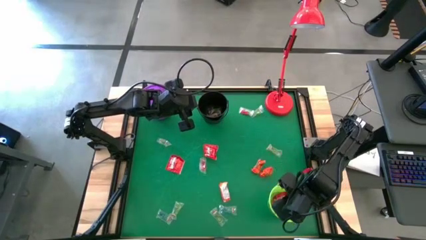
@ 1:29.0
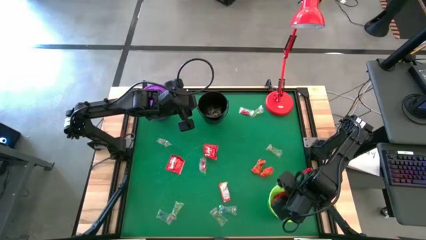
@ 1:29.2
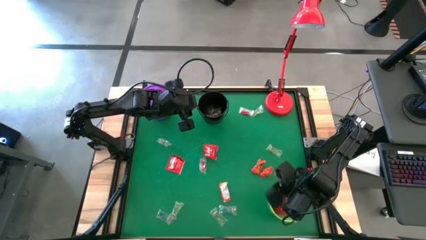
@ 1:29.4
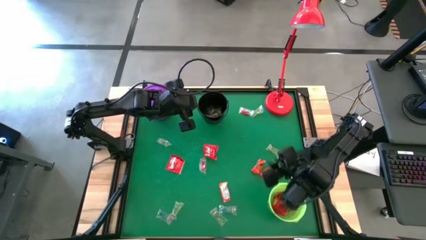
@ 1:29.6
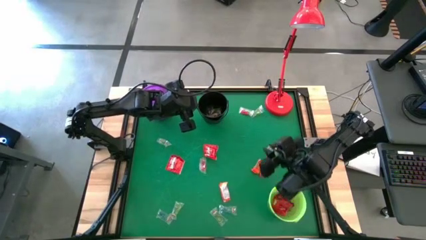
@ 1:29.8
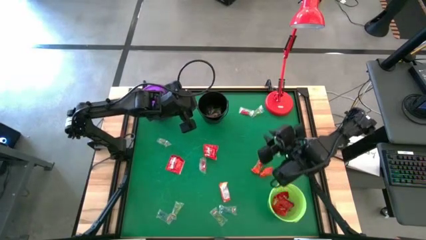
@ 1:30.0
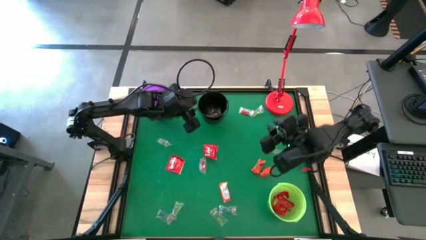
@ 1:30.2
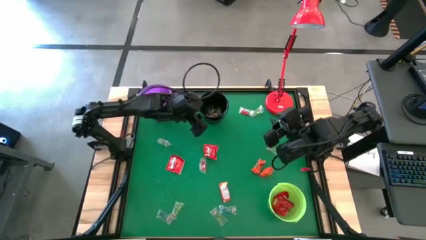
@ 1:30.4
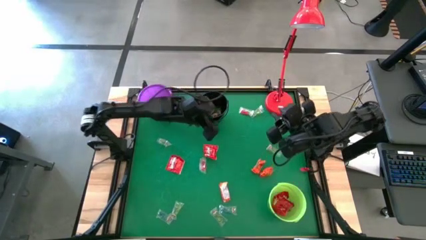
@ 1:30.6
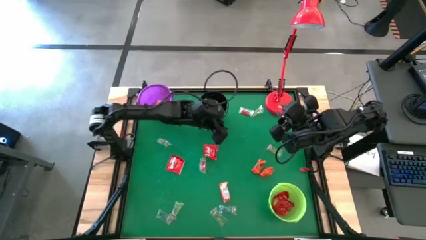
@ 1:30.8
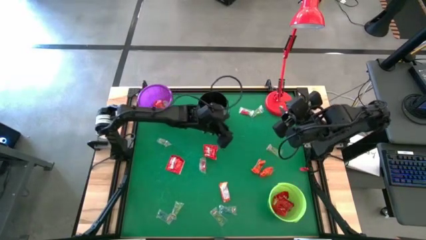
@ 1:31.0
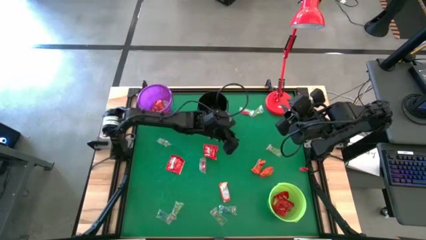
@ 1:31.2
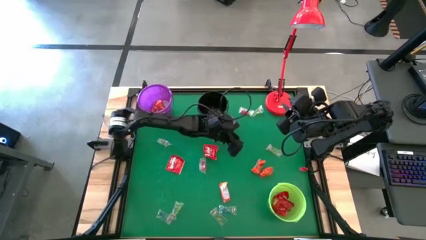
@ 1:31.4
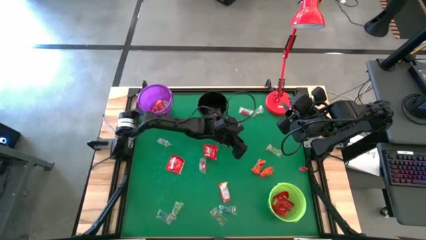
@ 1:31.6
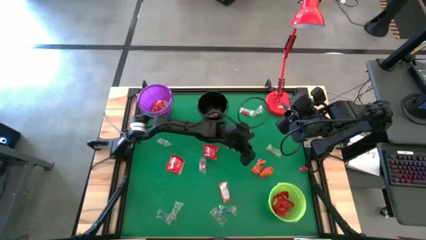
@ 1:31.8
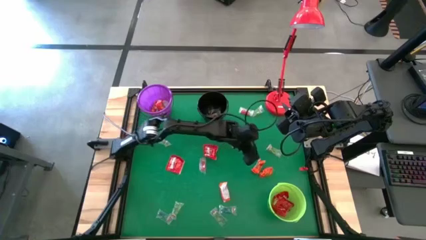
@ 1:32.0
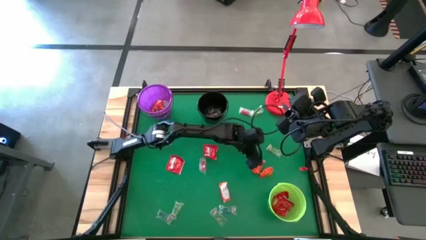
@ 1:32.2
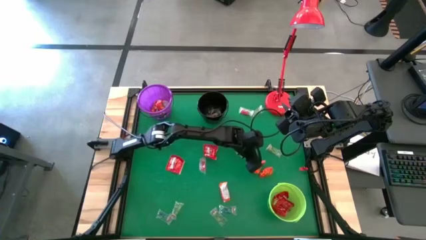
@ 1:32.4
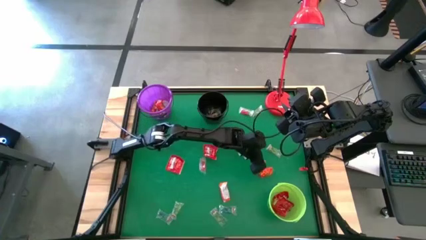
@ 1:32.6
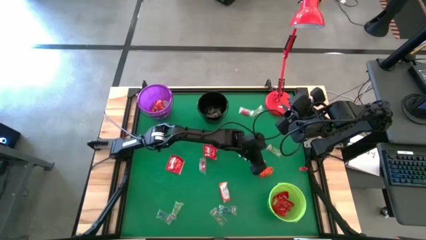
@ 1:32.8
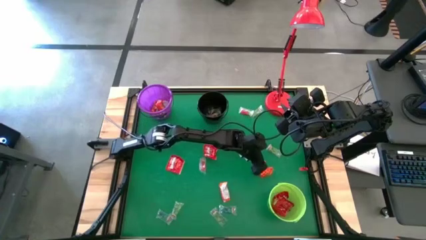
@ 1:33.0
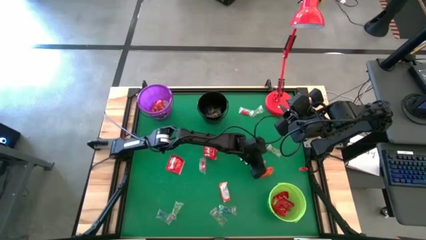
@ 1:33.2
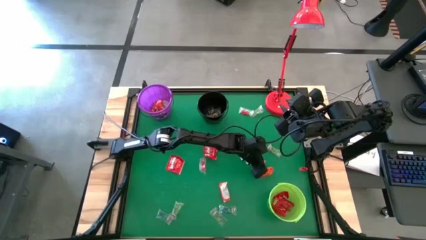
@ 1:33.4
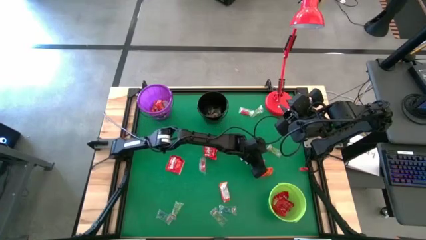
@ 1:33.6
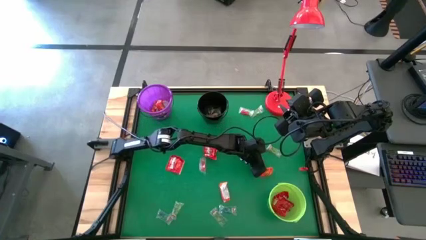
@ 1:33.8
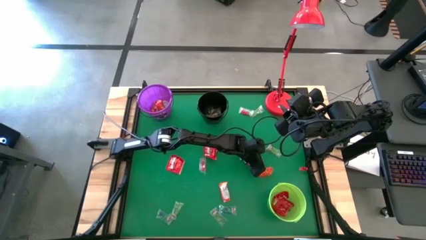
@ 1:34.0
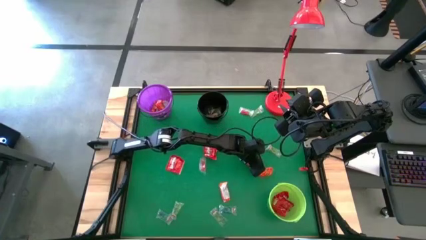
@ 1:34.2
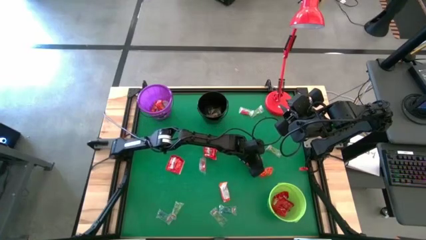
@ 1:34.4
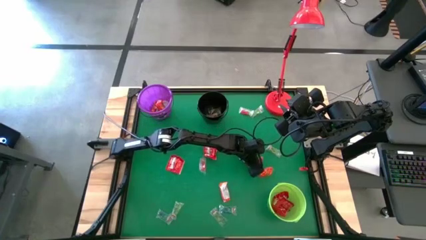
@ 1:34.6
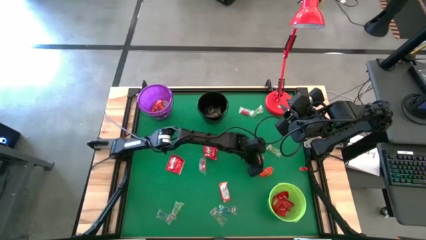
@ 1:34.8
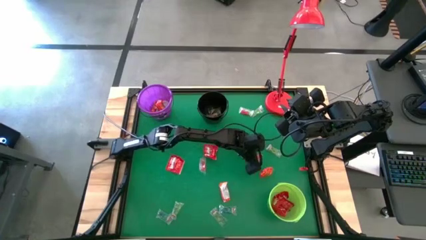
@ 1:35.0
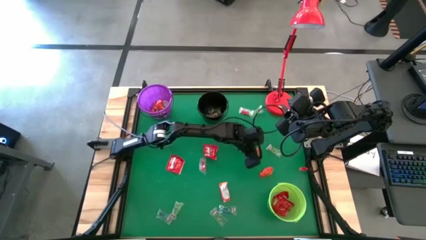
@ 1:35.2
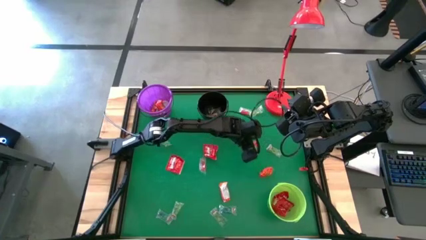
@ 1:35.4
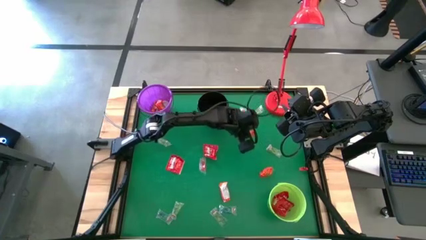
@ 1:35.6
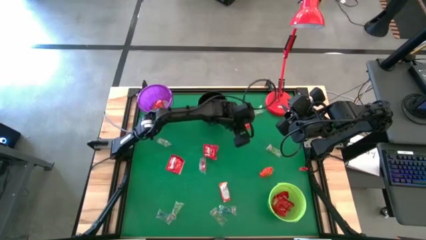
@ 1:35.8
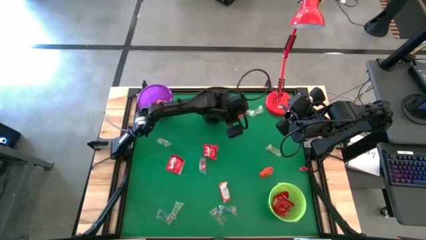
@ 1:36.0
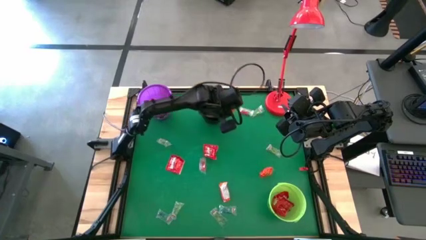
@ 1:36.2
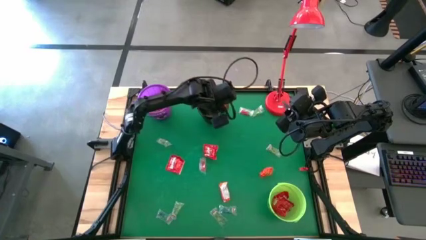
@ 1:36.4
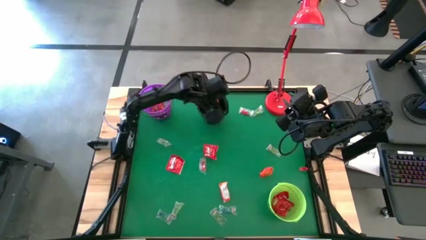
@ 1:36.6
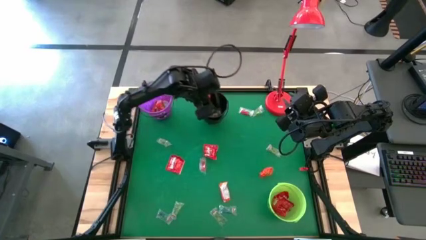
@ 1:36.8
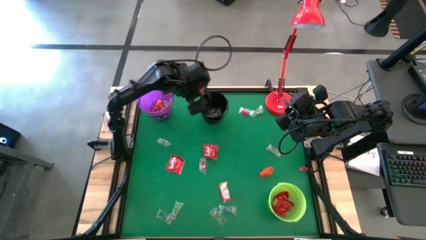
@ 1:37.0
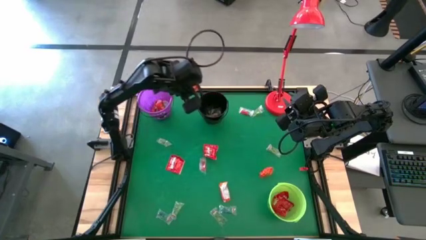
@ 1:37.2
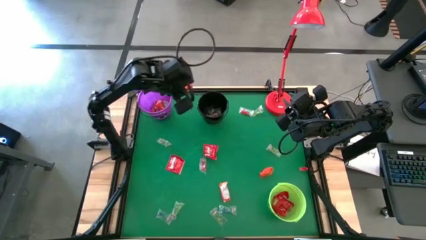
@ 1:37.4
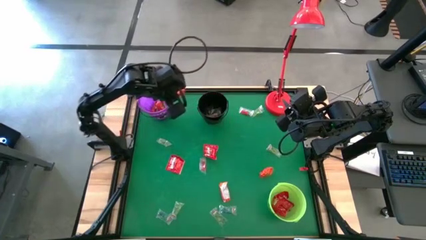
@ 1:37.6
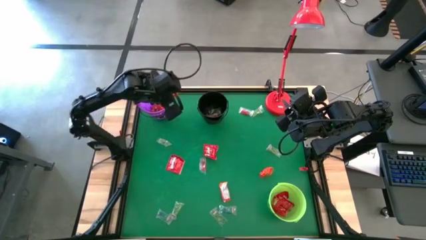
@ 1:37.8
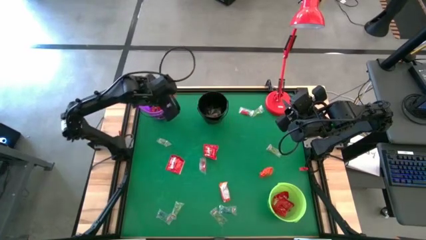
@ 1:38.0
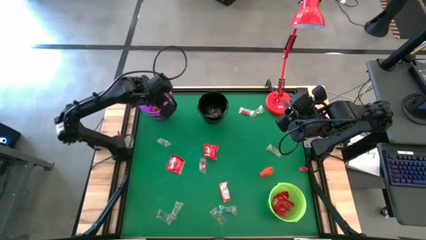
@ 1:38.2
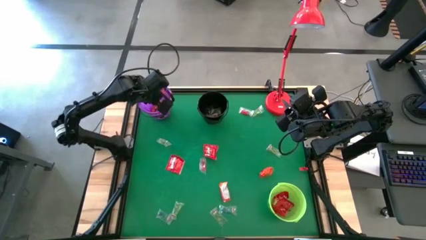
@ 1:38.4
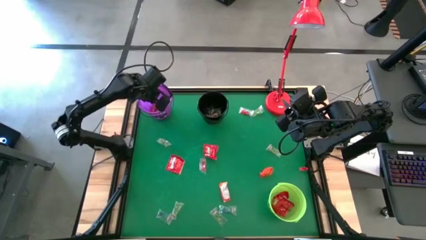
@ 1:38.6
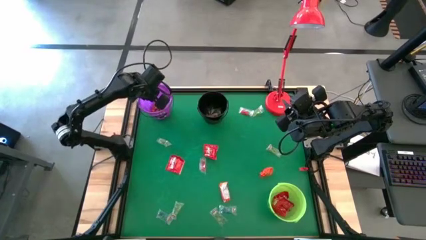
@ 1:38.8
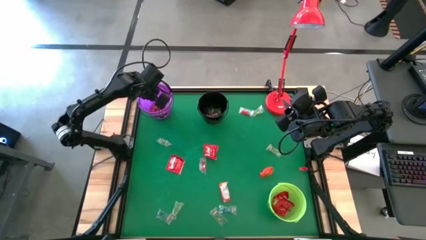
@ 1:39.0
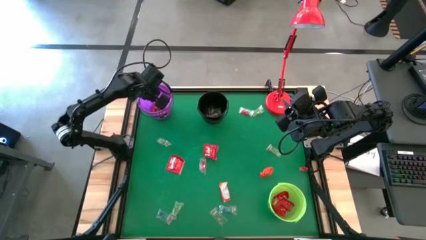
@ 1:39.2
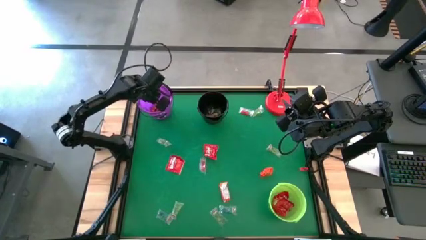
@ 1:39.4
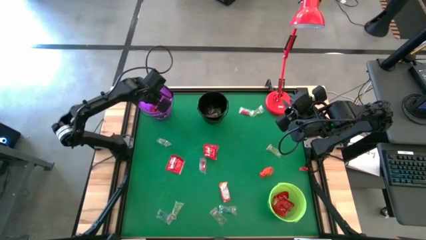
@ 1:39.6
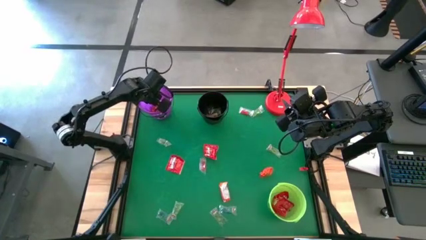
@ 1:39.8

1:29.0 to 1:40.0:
Task: Sort candy
Put the top left orange chocolate bar into the purple bucket

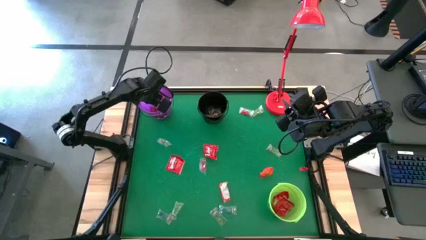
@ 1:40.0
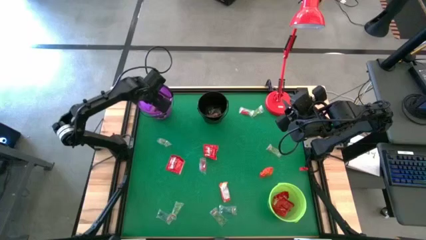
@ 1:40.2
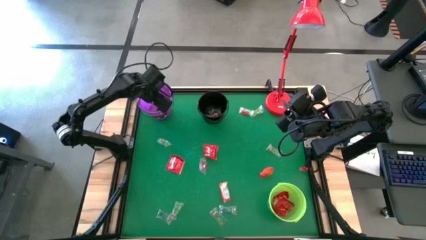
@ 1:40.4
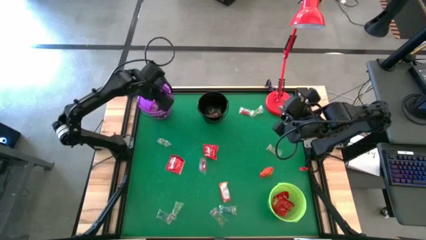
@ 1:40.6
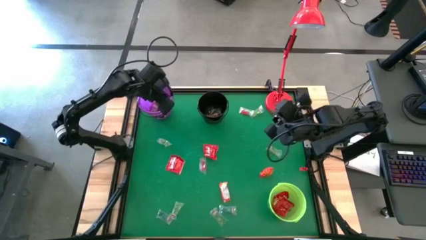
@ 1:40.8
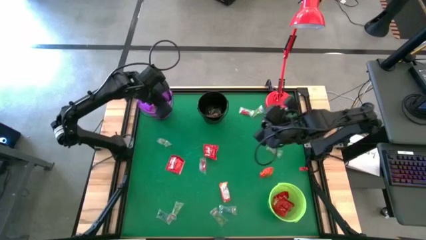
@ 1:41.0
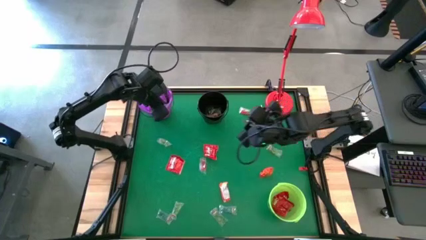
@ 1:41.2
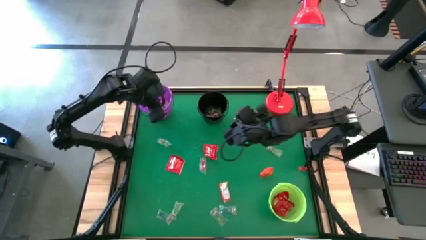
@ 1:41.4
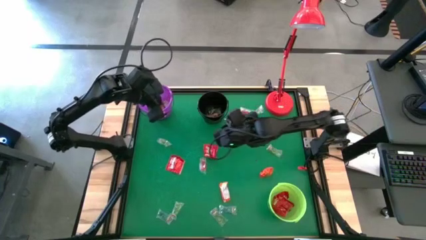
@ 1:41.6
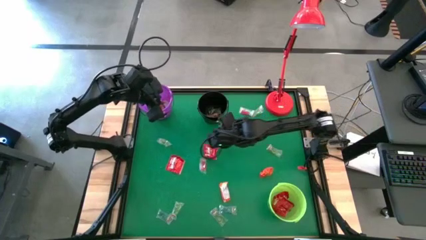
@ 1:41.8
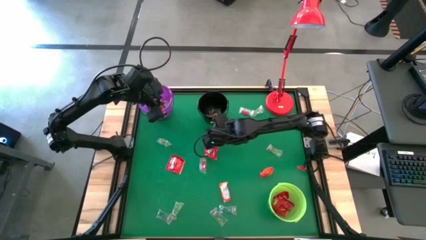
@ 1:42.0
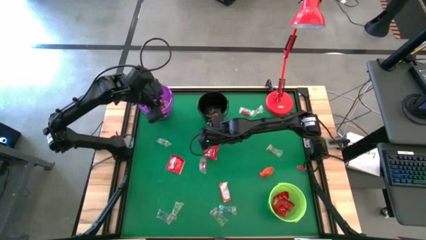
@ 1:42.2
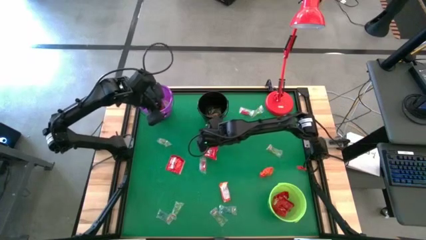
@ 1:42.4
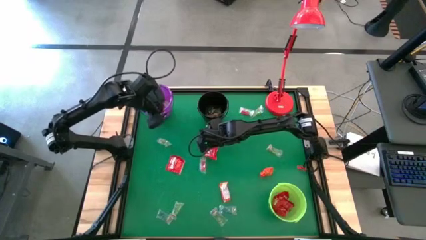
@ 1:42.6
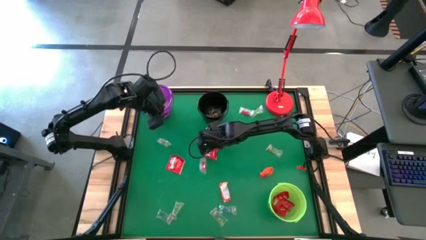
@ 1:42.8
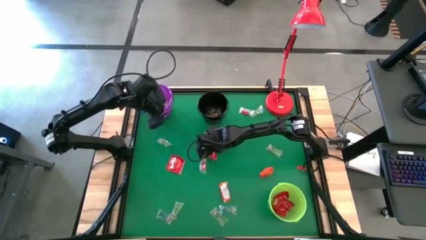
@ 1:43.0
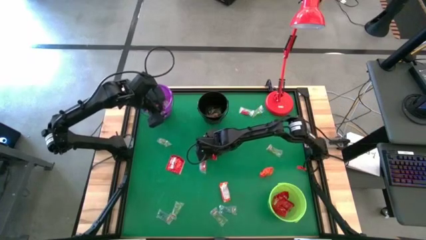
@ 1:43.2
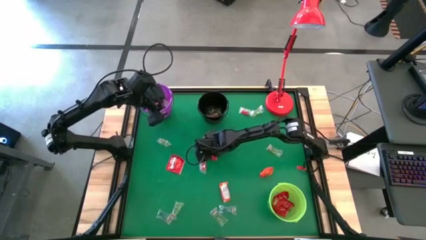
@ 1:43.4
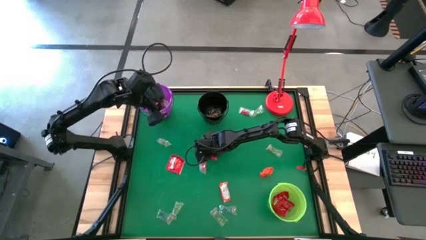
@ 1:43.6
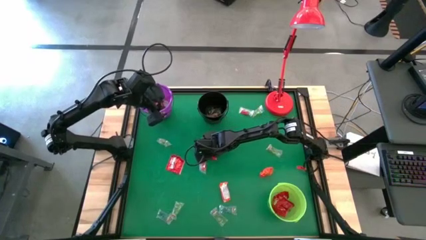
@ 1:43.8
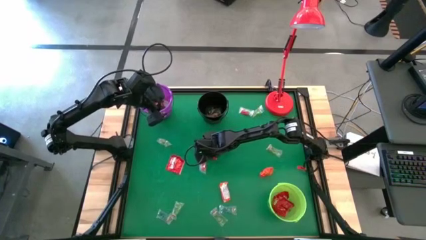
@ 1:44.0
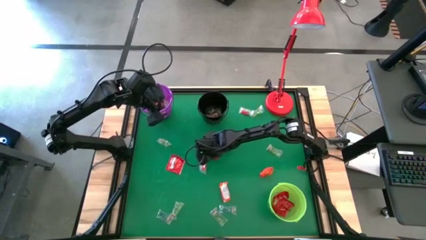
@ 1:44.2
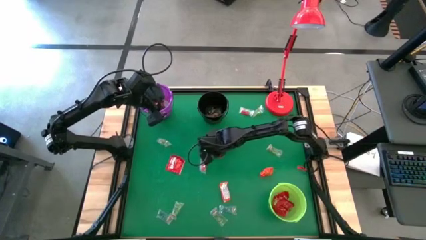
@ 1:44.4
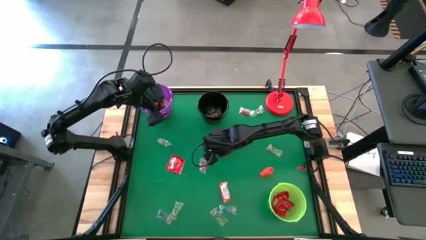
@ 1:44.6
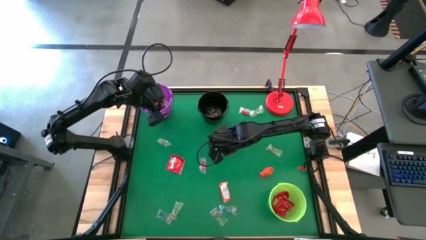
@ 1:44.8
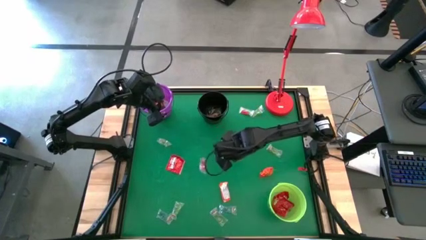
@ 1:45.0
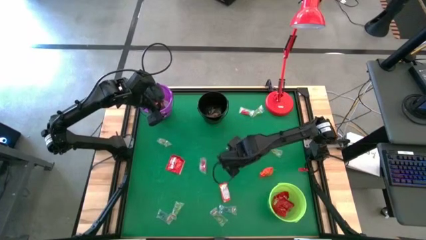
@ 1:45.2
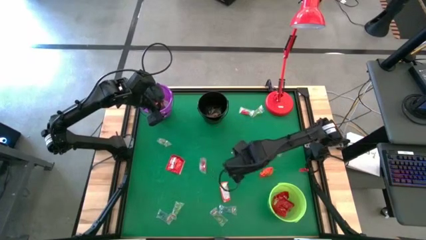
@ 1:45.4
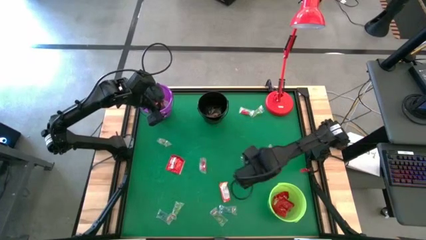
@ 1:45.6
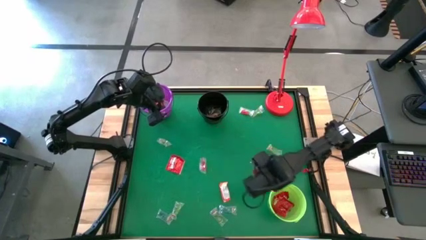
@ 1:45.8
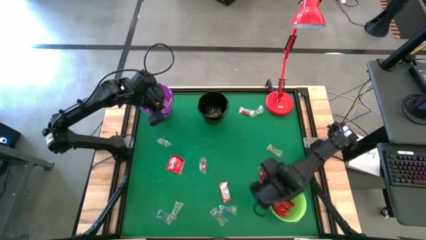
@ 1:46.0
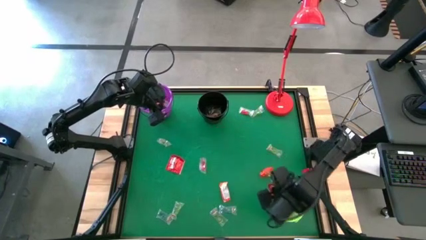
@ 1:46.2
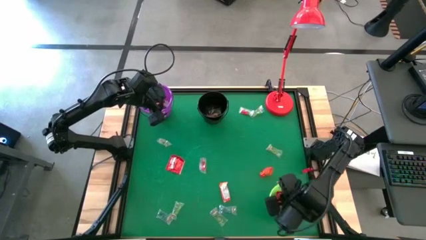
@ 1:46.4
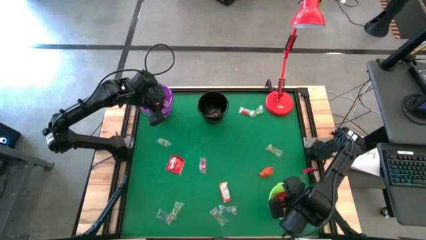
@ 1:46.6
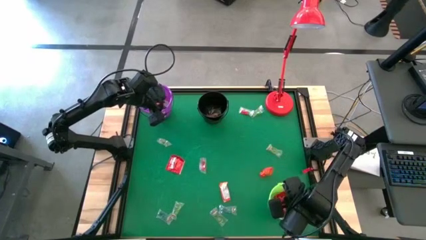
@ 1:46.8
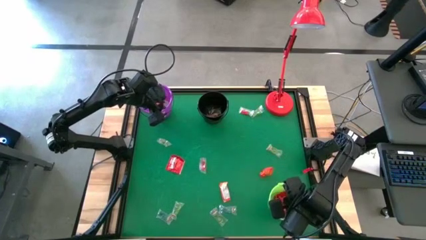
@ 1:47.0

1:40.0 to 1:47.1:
Put the right red candy into the green bucket
